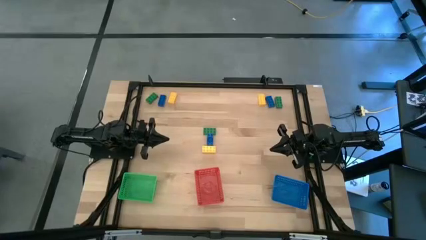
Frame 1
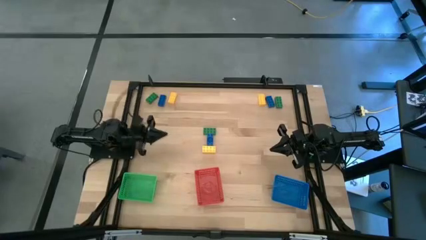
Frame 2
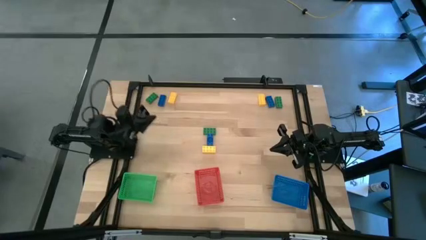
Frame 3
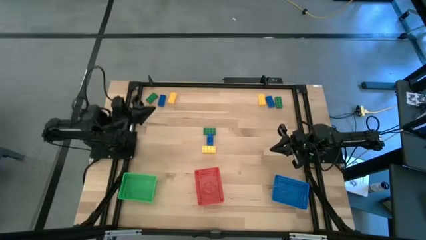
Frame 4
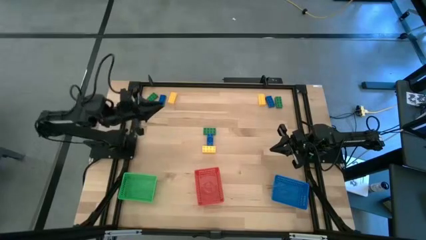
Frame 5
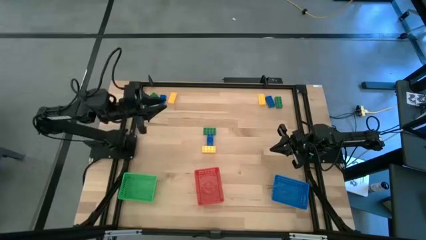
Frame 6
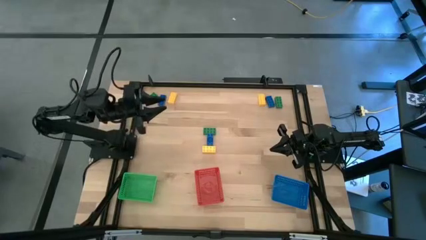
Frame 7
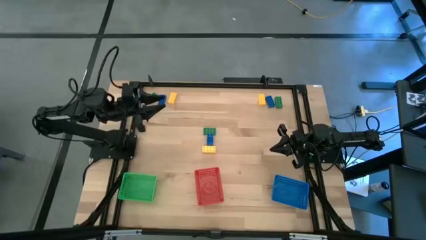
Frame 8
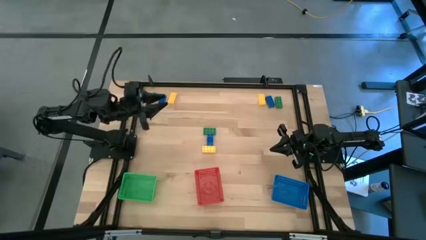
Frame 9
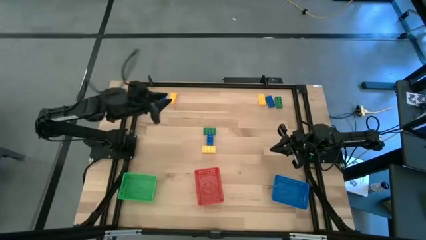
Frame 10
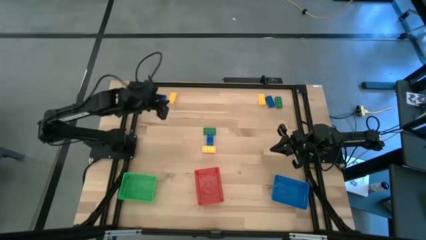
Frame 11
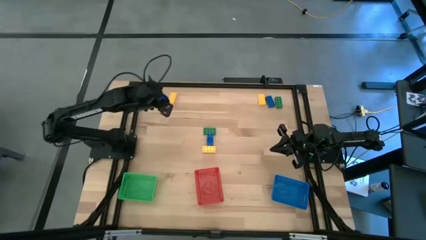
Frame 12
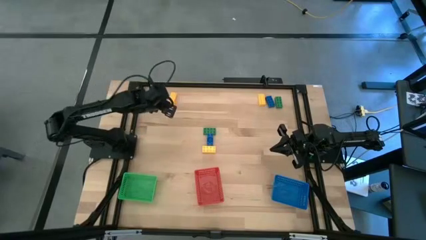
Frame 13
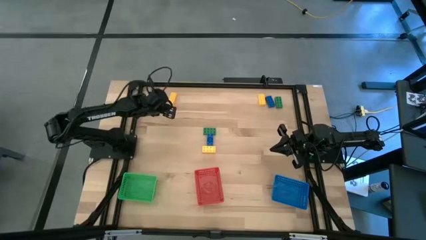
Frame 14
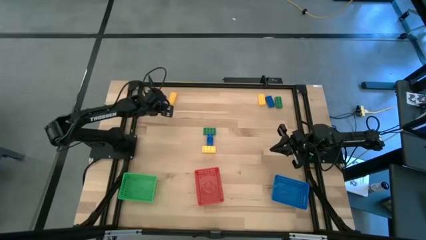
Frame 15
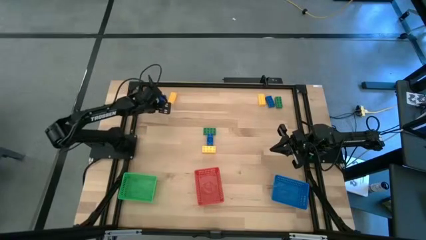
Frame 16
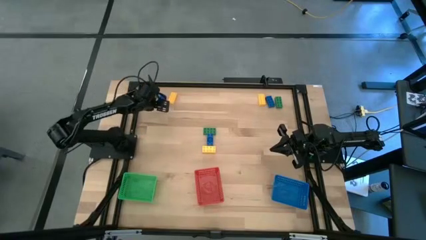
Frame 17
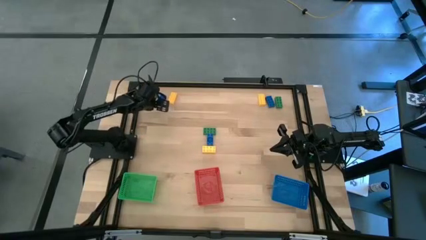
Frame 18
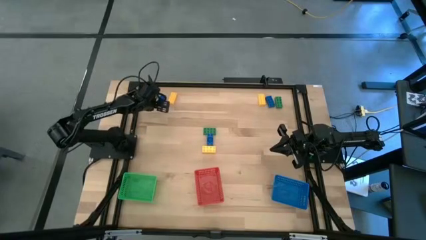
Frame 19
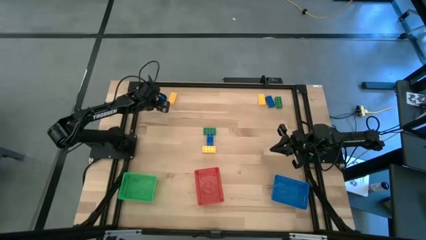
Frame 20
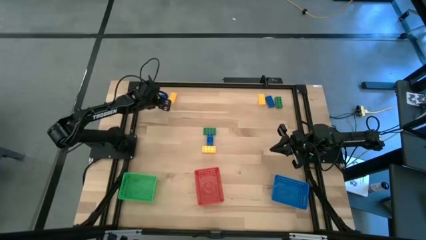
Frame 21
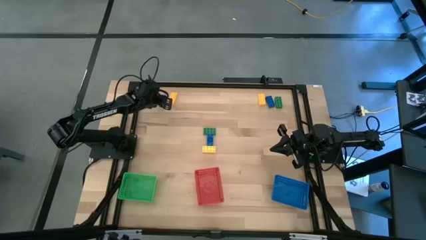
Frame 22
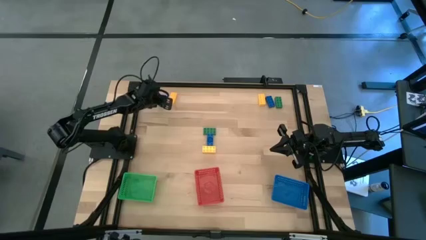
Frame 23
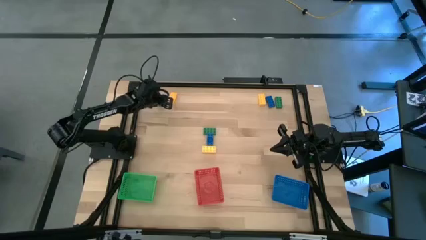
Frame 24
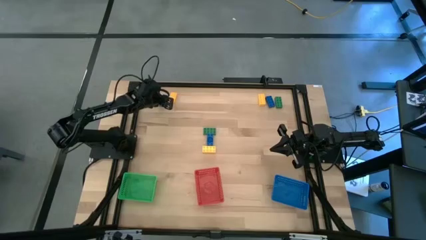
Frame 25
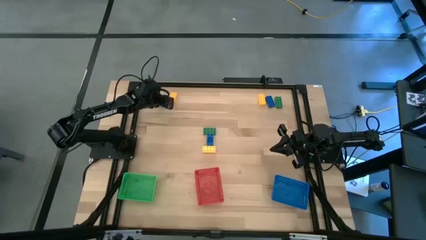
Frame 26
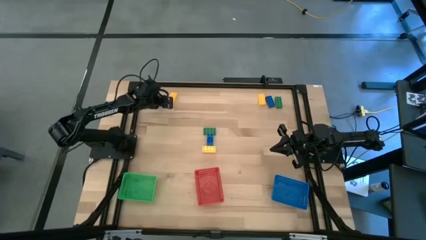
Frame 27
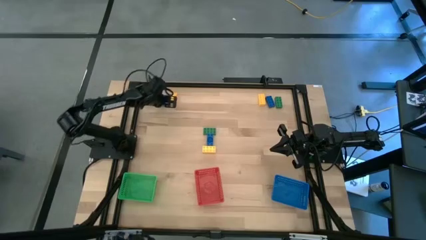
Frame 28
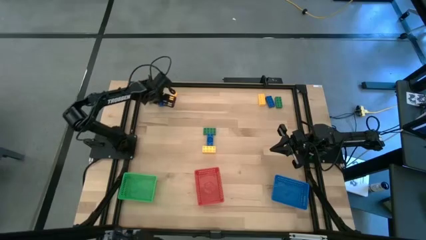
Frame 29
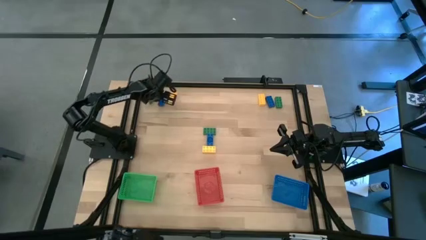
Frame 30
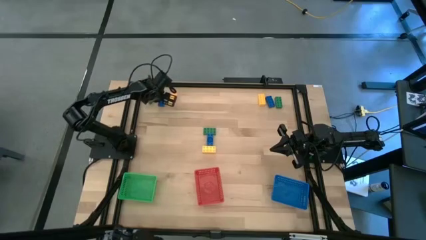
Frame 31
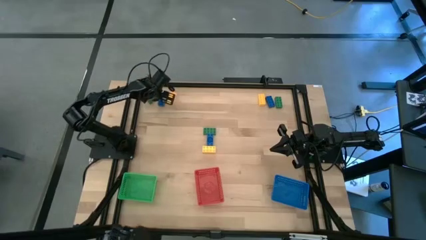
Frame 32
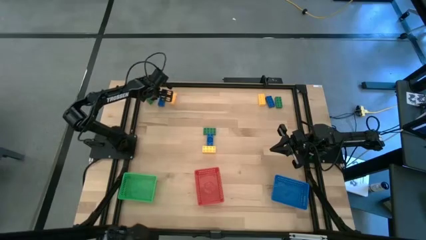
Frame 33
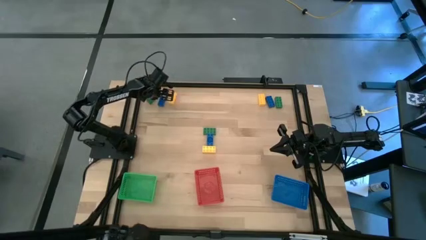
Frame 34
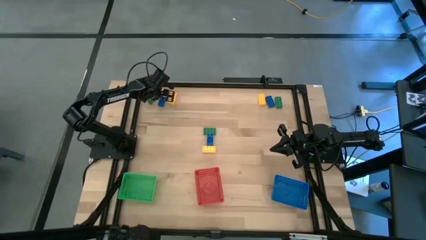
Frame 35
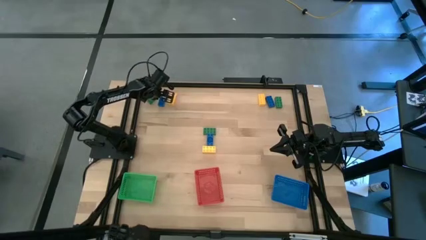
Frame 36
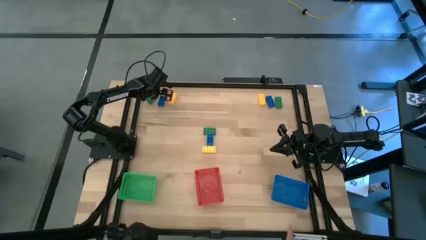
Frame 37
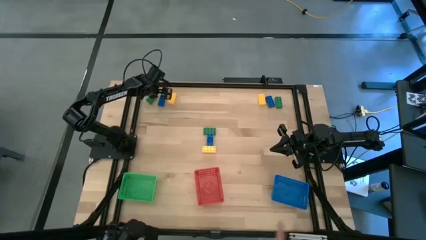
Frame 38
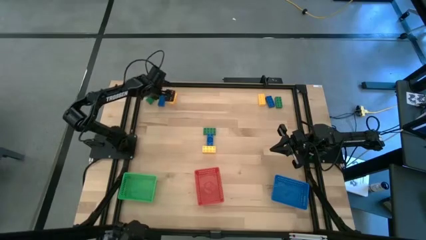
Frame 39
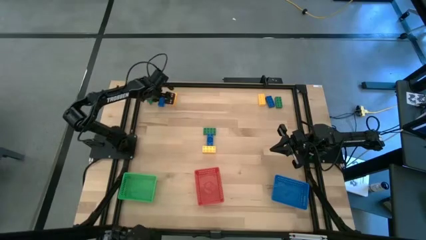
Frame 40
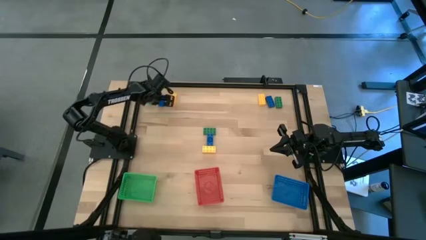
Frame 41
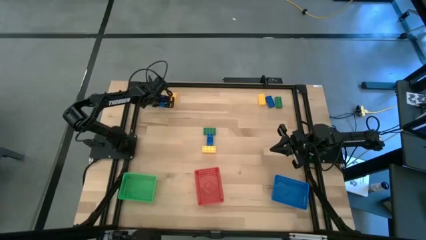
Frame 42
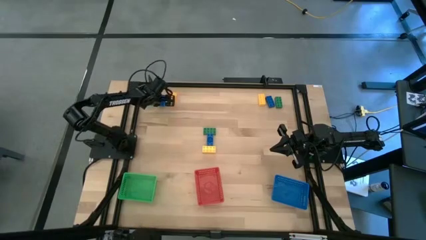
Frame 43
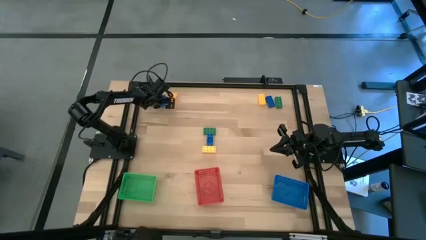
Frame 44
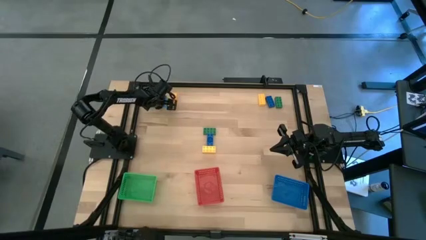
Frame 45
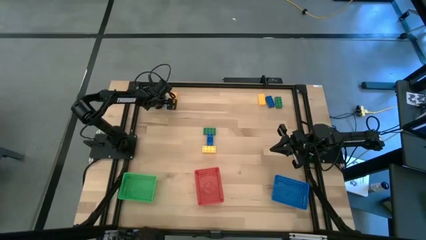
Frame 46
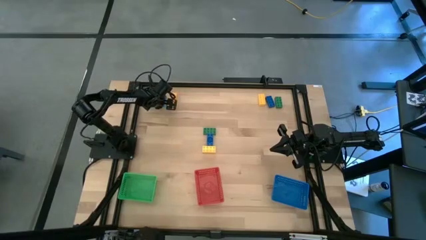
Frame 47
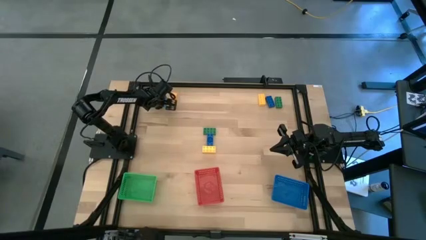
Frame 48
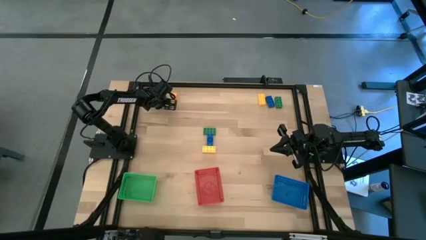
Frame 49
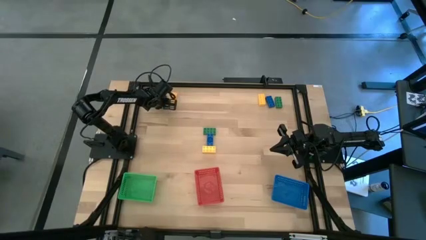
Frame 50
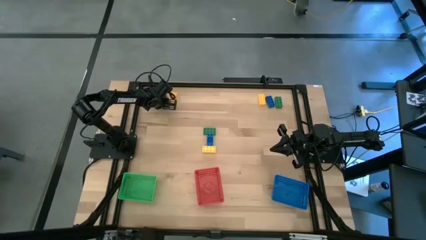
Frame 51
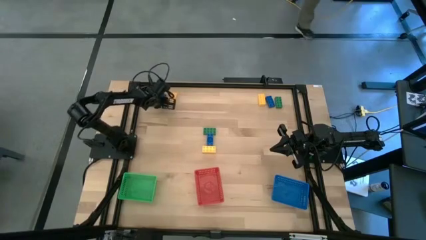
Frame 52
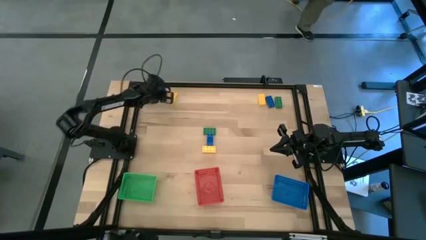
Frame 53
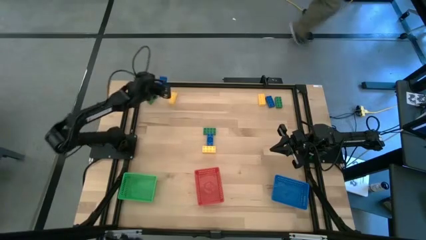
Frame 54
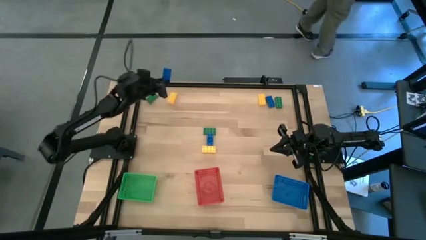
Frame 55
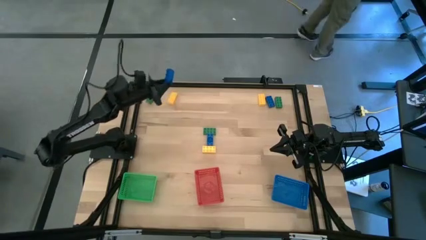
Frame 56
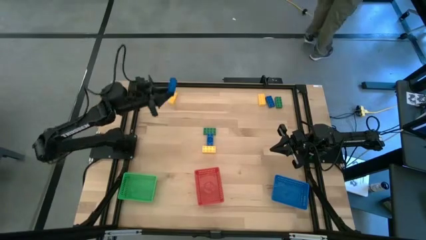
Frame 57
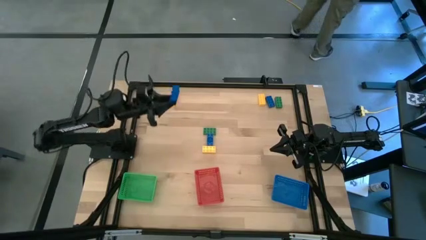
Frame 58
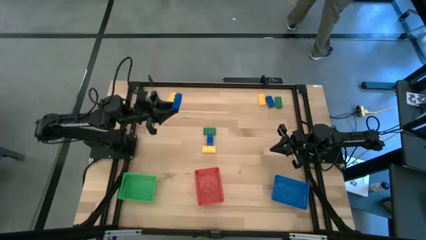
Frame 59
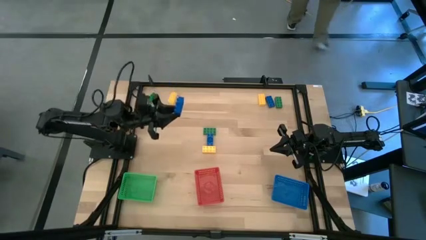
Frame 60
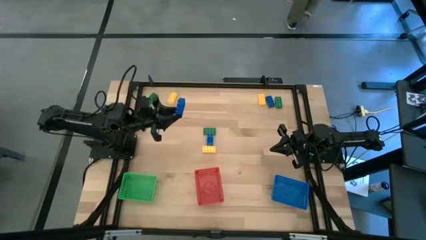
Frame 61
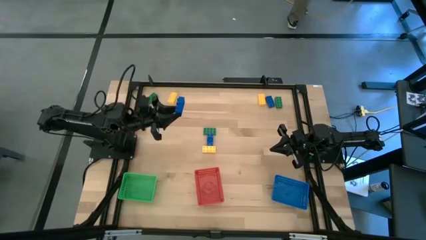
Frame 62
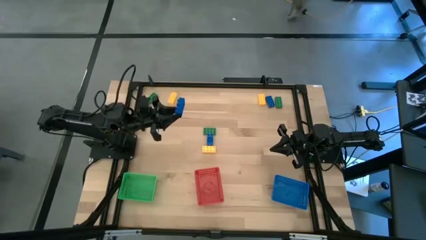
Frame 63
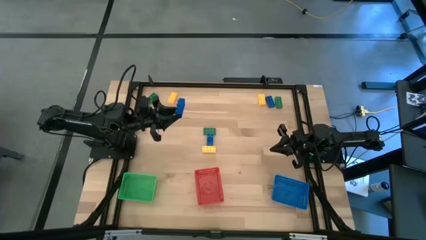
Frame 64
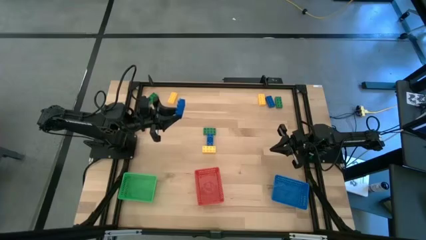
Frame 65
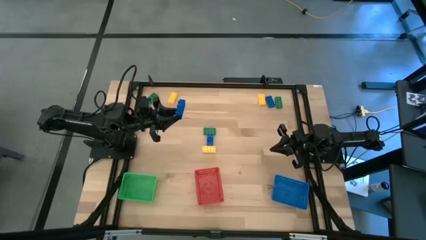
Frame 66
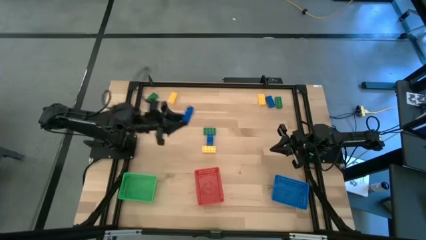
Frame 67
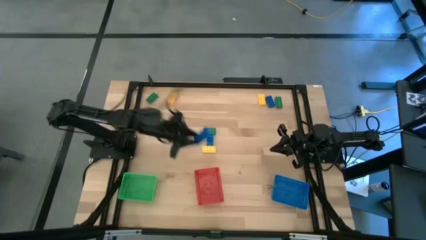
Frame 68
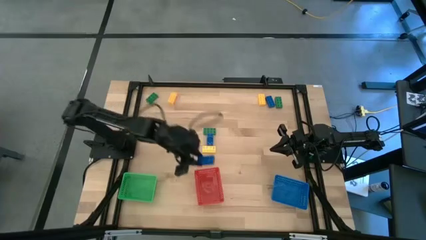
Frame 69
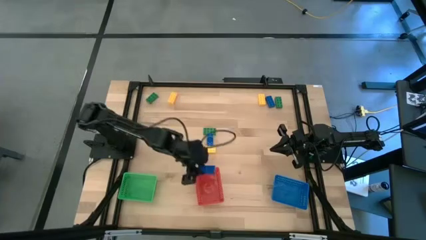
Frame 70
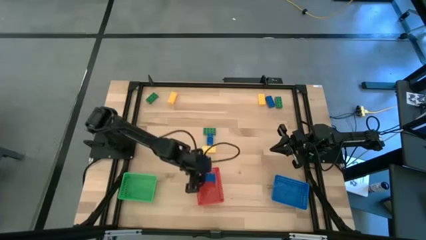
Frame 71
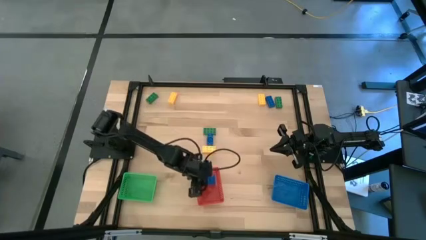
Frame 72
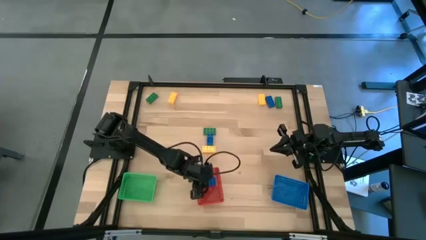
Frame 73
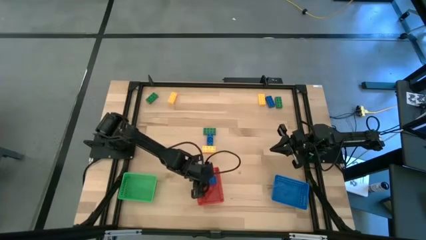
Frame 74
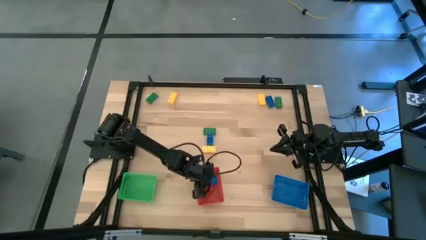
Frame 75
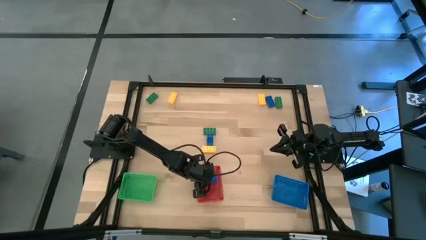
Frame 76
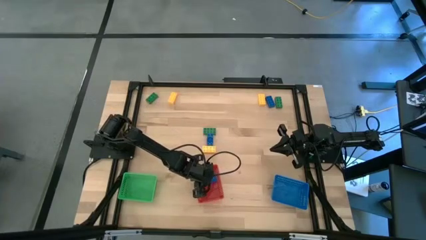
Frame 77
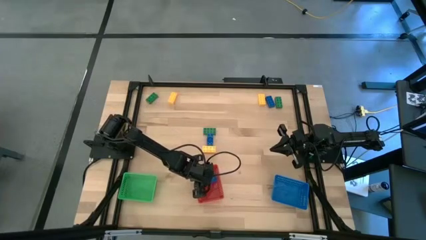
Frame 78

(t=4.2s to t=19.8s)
Task: Sort & place blocks by color
Put the top left blue game piece into the red bin
